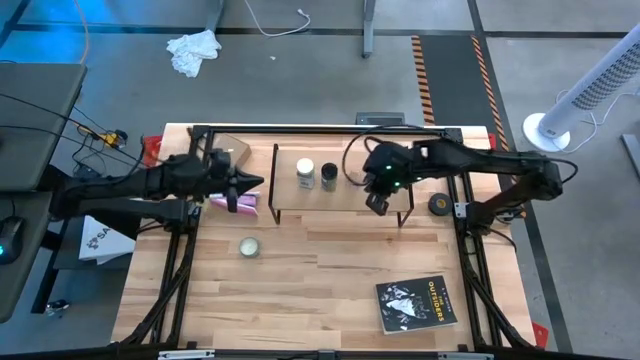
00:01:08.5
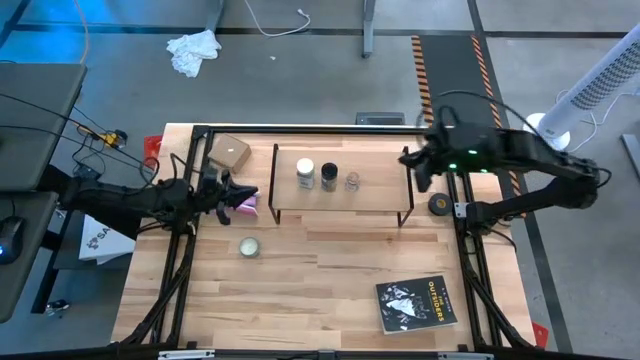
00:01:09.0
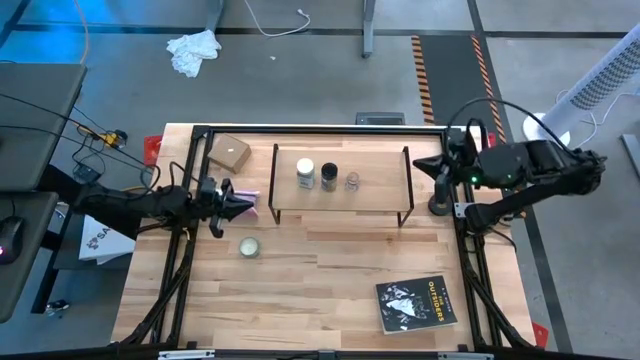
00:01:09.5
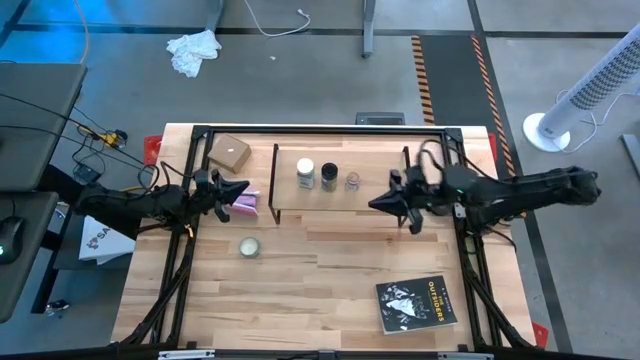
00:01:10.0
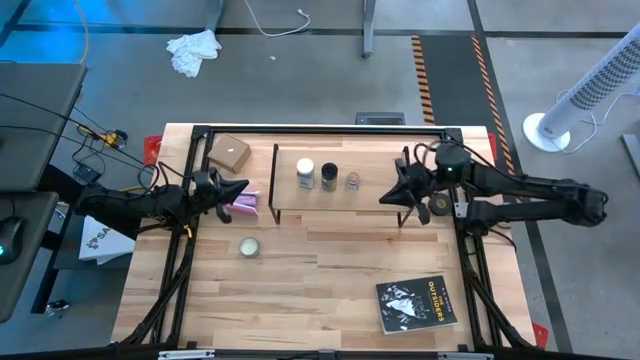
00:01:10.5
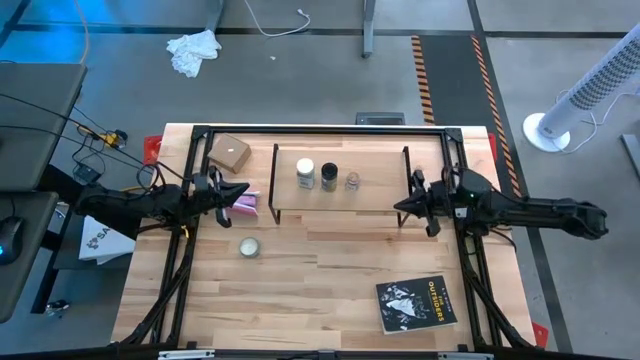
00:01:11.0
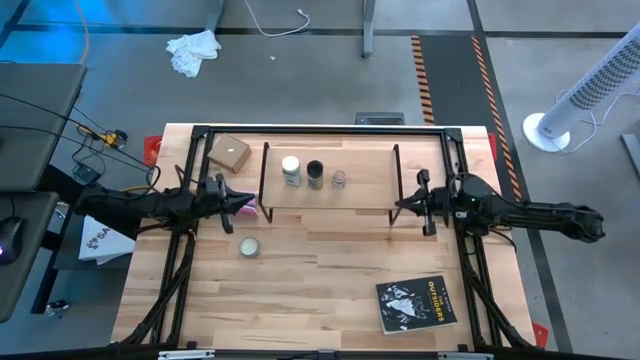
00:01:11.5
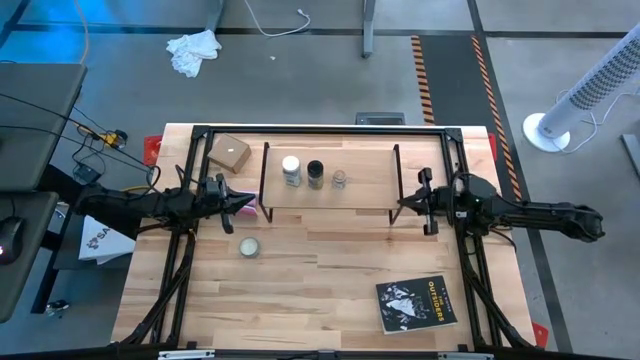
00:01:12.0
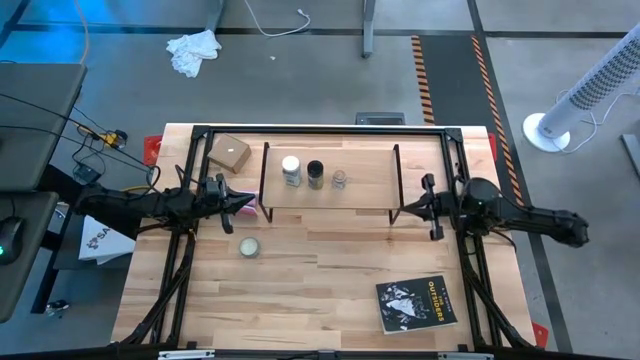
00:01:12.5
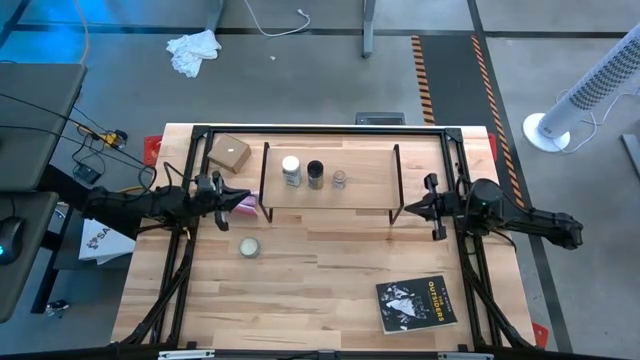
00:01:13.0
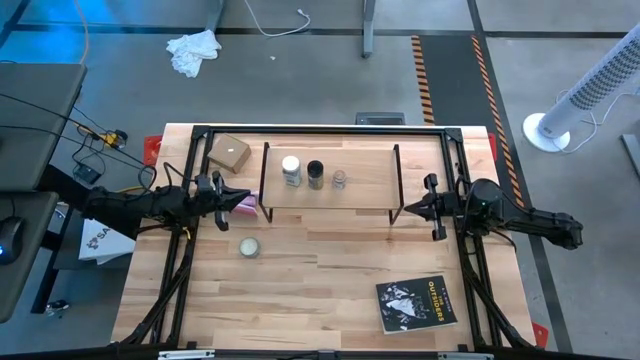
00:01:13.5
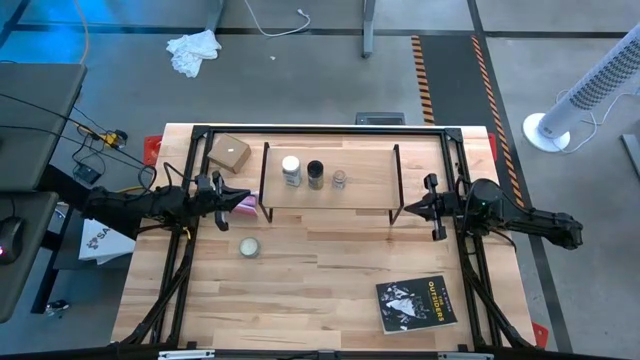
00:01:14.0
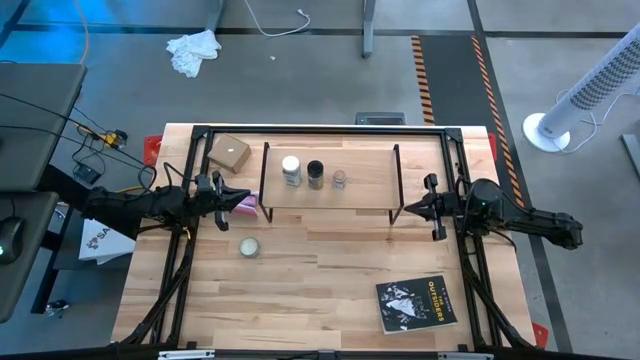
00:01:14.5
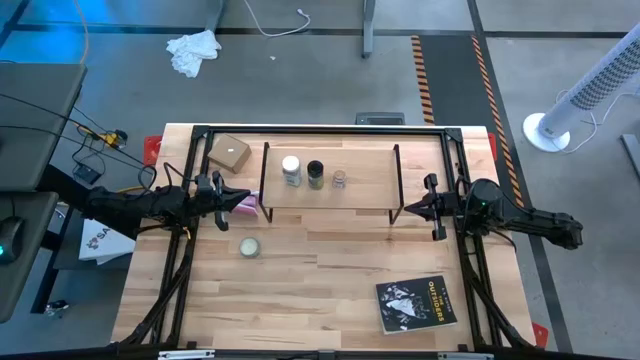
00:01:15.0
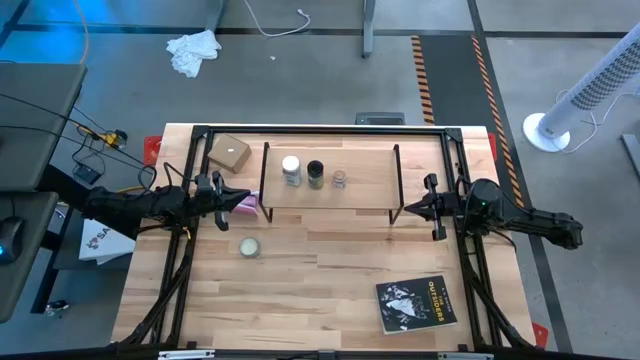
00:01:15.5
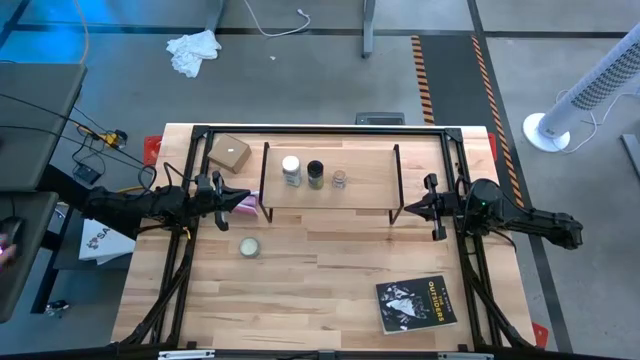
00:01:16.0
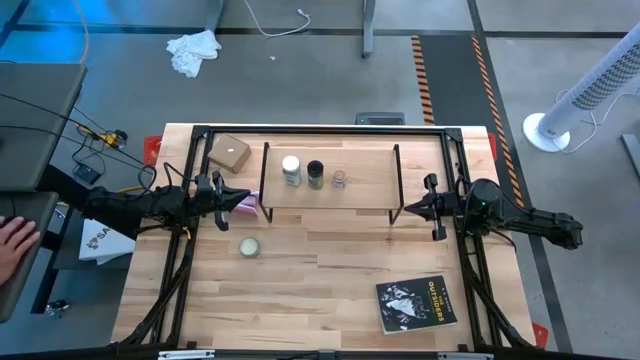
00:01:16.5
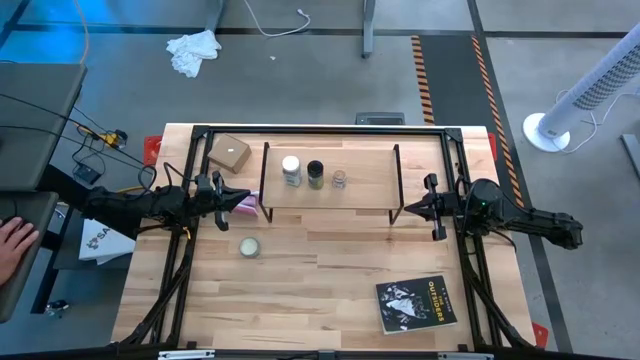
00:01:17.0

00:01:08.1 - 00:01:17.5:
Task: Shelf spices
Return to Home Position

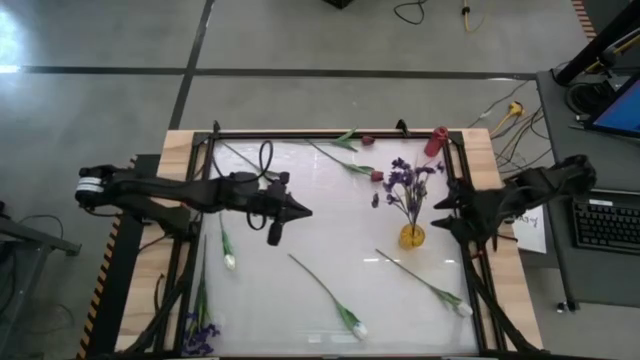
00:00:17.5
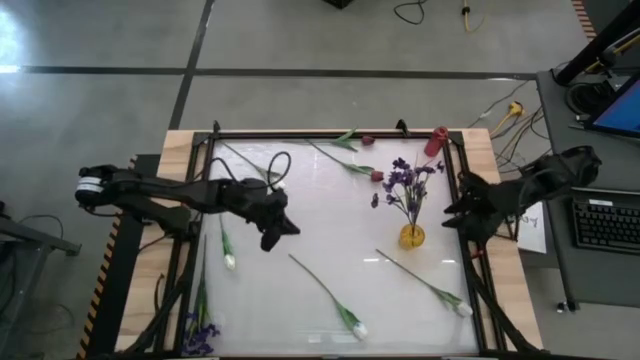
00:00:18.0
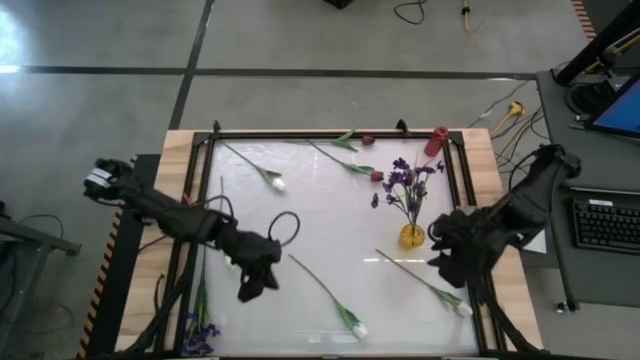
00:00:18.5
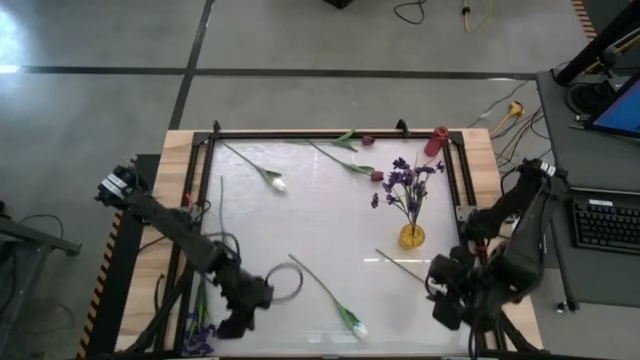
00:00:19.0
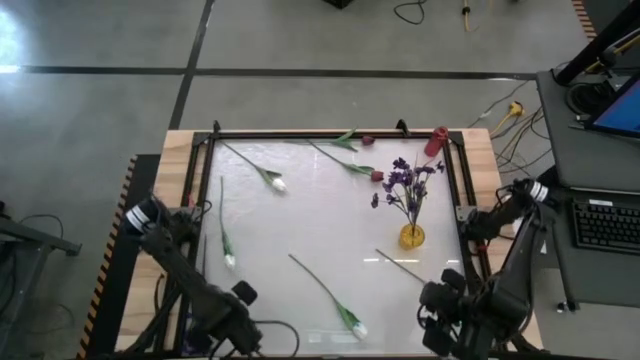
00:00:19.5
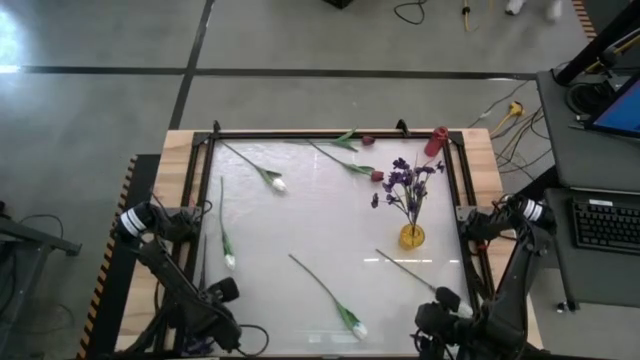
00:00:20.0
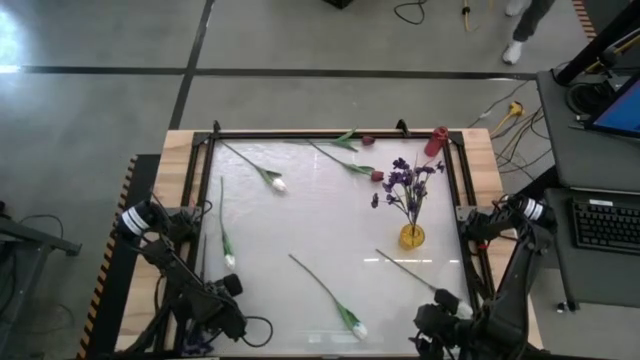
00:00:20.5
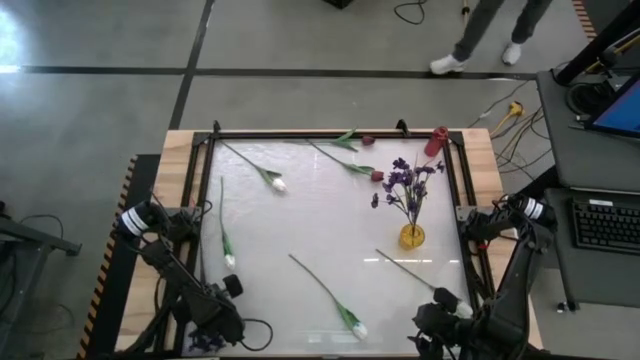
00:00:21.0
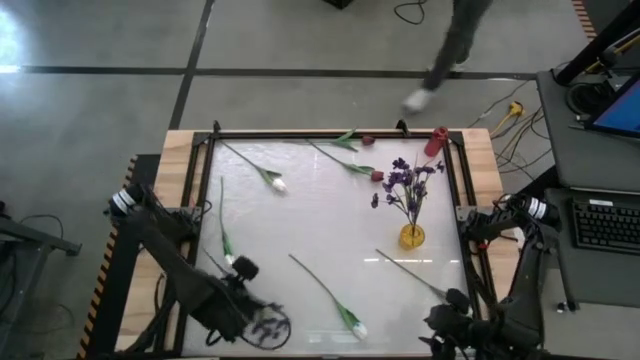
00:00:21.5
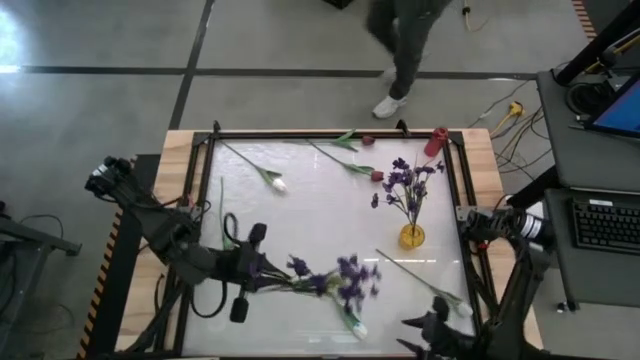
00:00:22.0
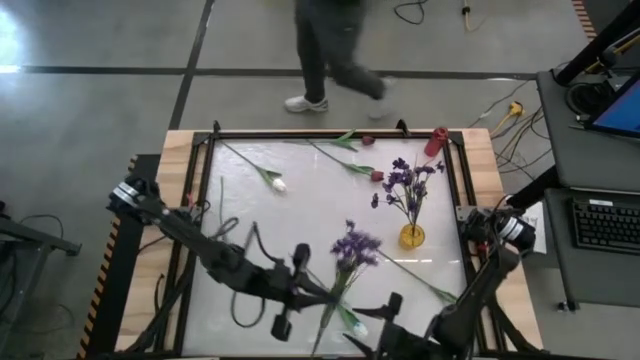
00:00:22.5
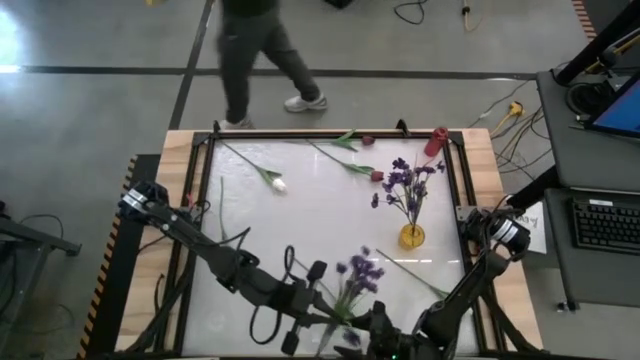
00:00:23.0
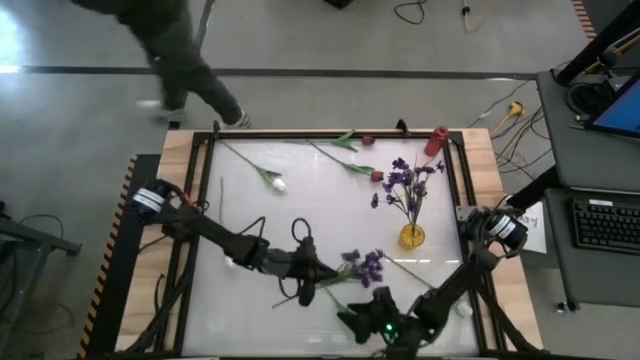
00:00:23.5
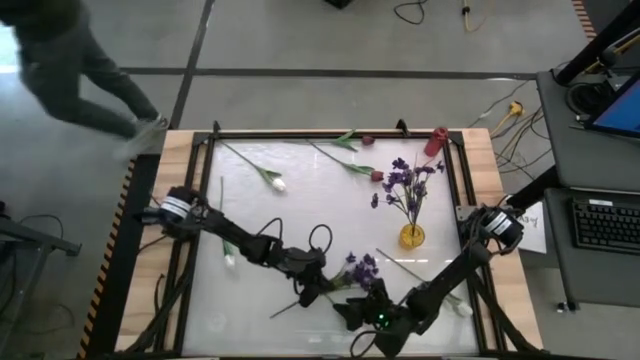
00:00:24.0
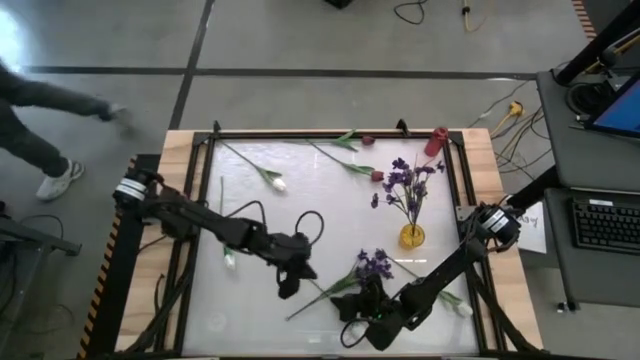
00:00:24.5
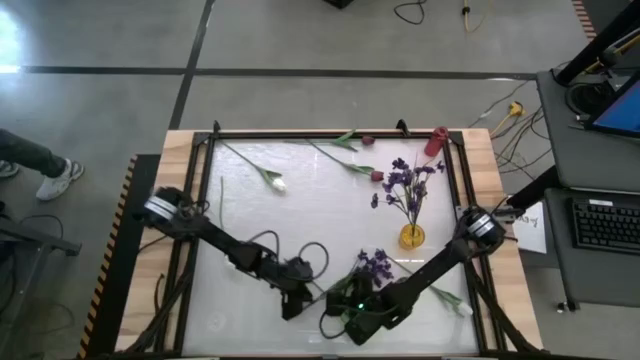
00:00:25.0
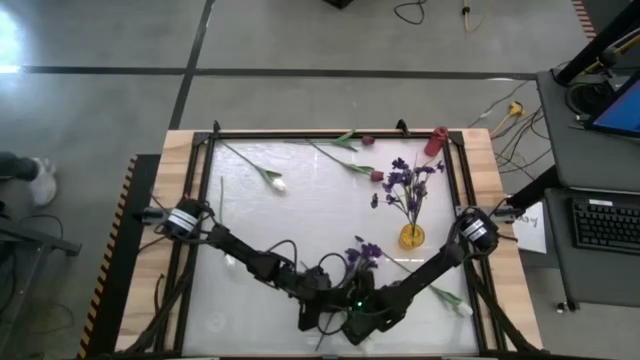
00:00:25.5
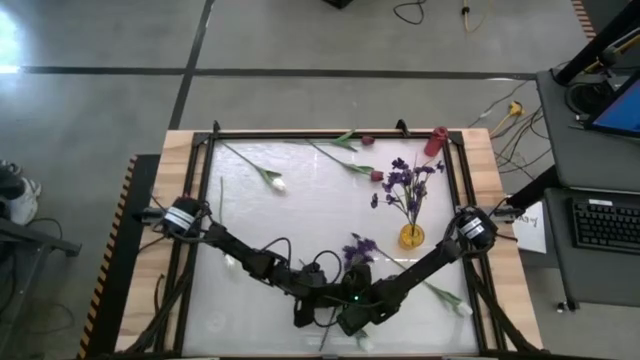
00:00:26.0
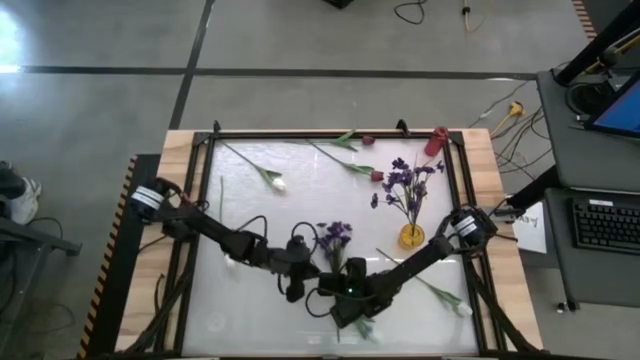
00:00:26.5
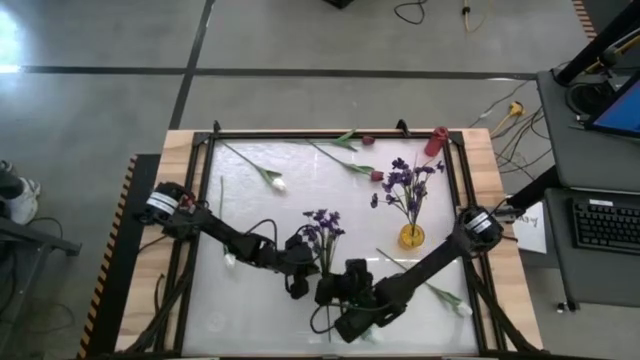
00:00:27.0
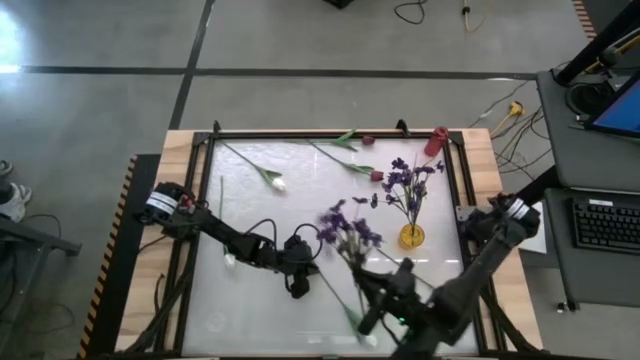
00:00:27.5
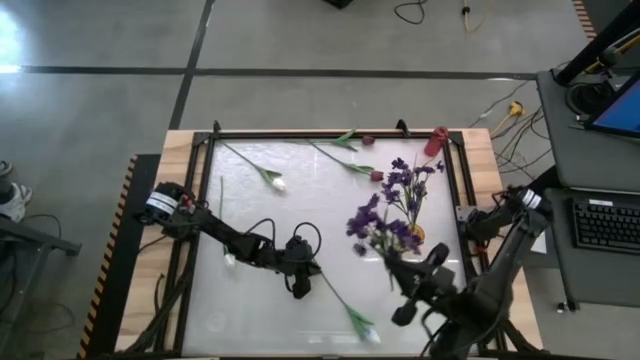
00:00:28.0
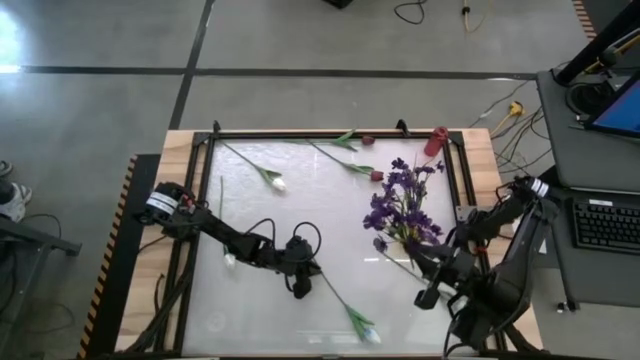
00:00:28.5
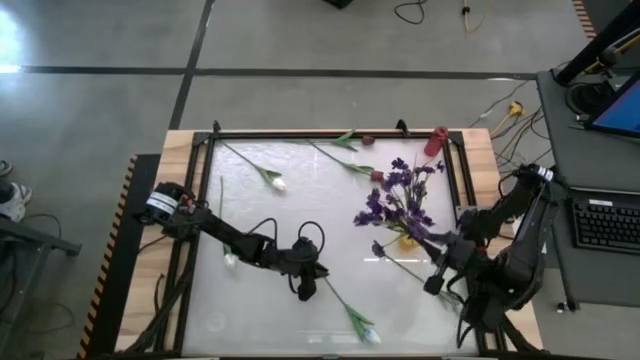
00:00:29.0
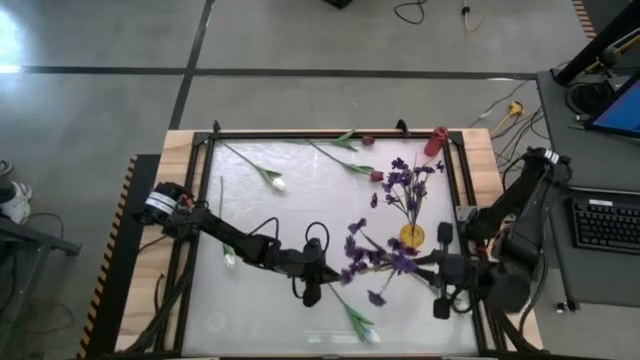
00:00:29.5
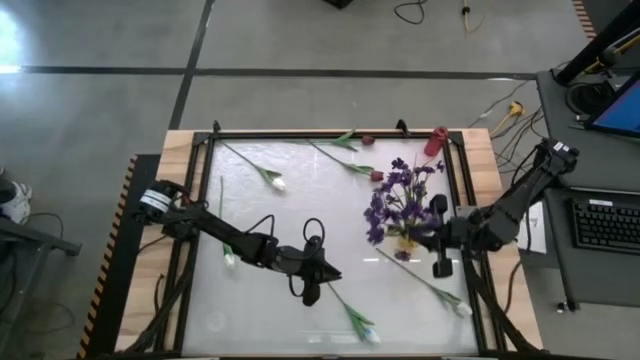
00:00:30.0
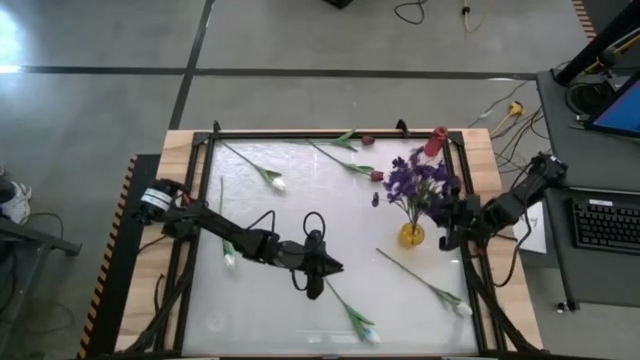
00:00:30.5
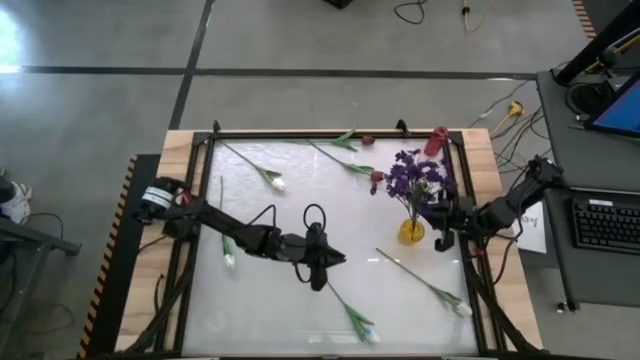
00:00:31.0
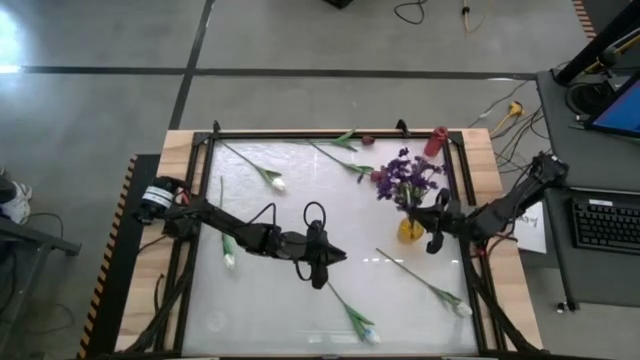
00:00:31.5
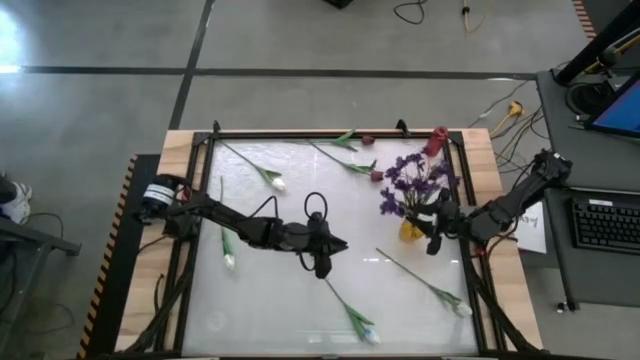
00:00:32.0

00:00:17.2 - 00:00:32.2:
Task: Sort flowers into vase by color
Put the violet flower into the yellow vase
